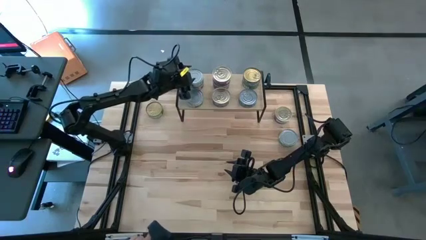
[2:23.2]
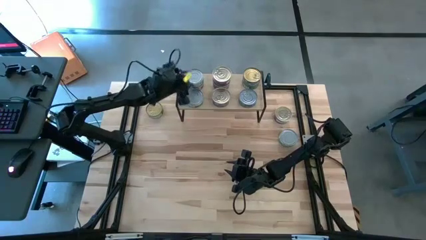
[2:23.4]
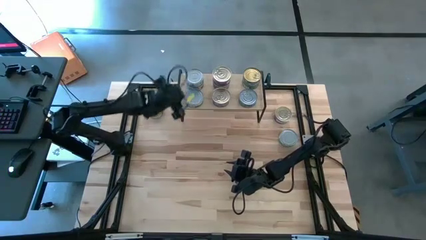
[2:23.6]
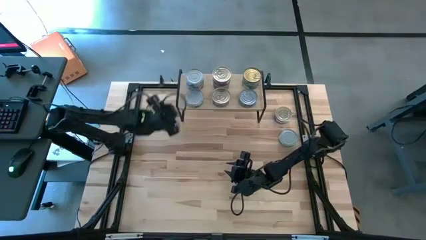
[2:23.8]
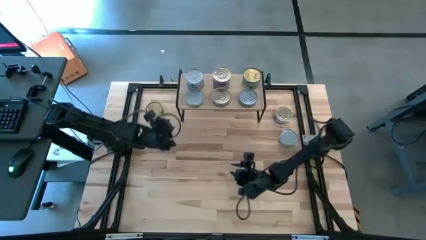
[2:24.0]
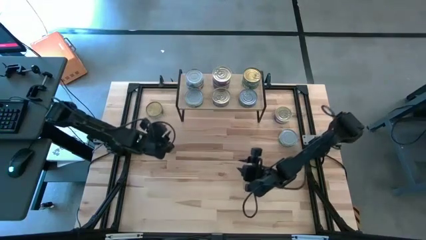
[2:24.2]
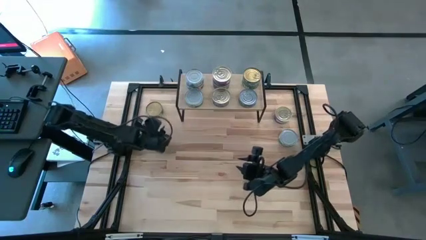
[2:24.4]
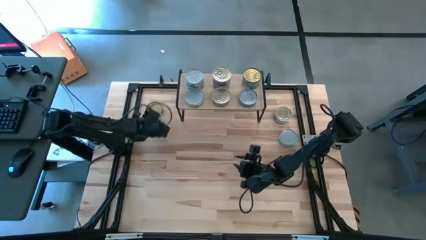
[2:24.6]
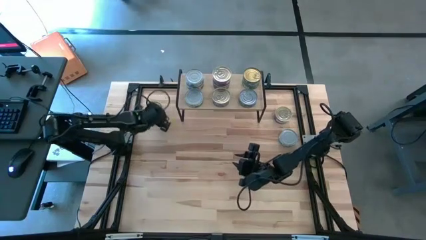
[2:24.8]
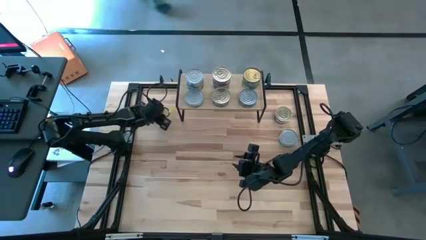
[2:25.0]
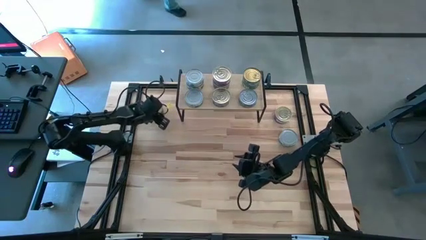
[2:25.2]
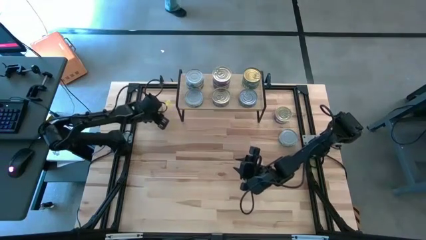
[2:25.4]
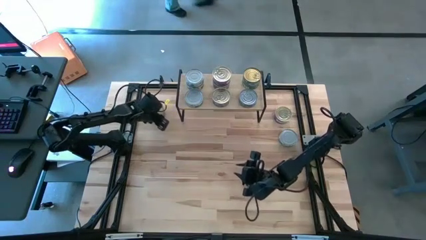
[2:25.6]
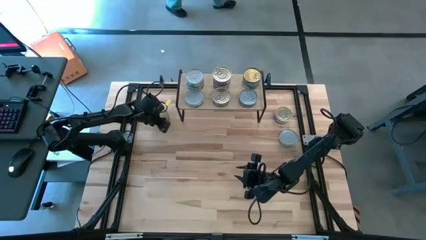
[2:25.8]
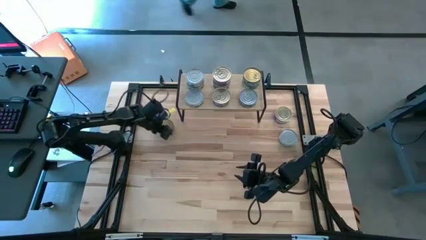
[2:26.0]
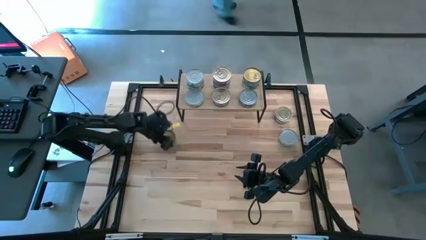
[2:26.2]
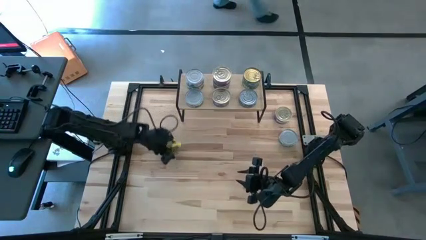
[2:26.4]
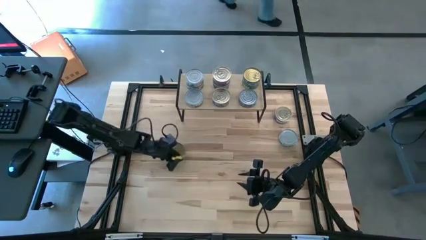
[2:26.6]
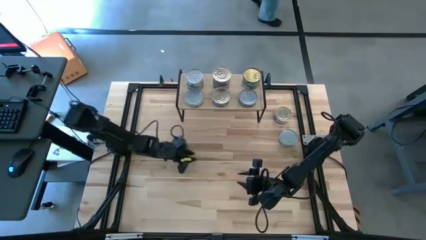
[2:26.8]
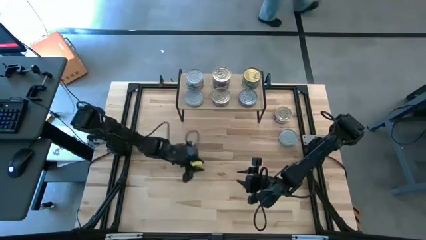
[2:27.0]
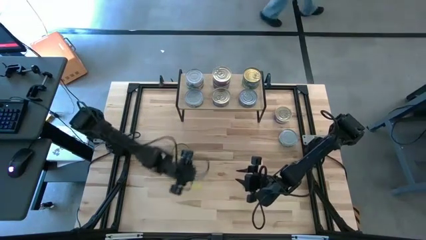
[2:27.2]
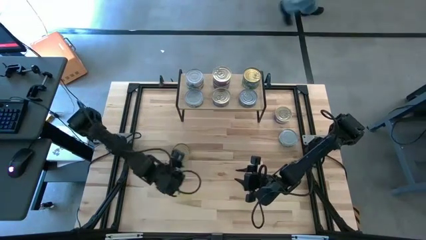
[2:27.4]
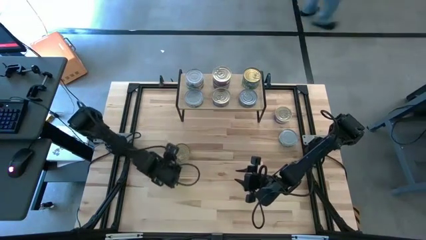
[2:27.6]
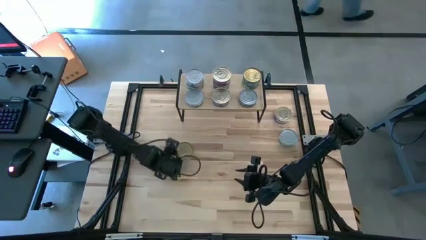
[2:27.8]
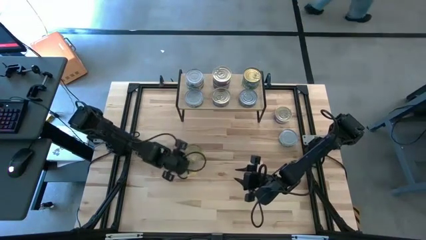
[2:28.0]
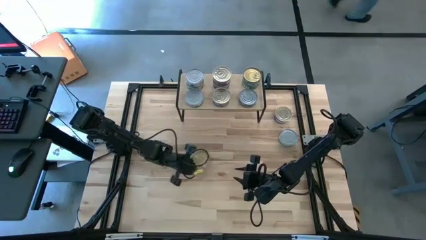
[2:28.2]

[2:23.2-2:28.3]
Task: Stack canned seafood by type on shelf
Stack the green tuna can on top of the green tuna can on the shelf

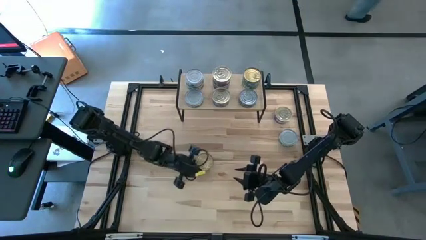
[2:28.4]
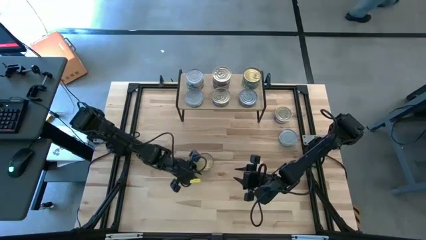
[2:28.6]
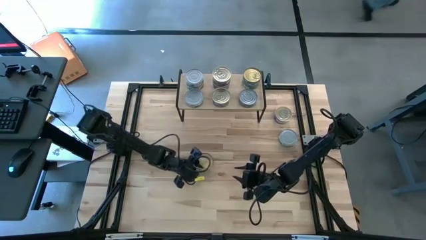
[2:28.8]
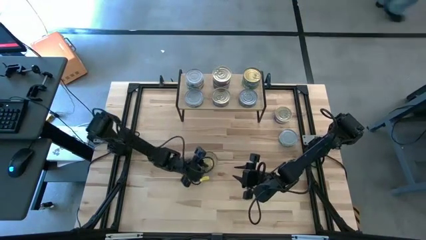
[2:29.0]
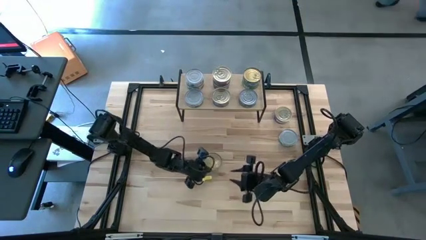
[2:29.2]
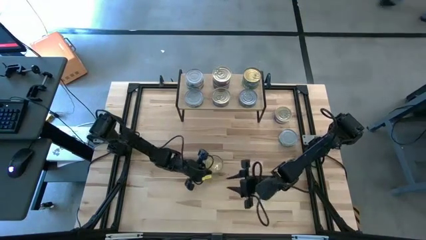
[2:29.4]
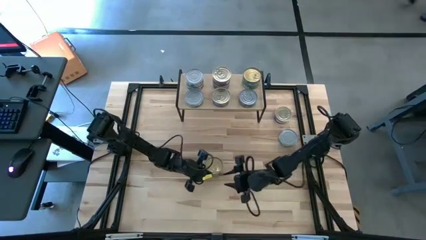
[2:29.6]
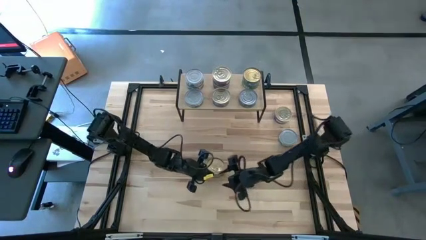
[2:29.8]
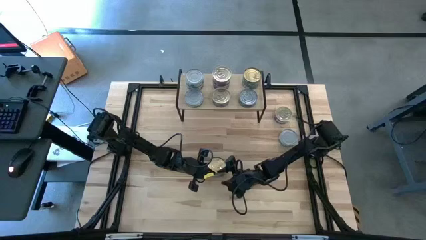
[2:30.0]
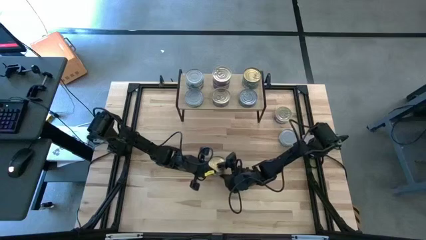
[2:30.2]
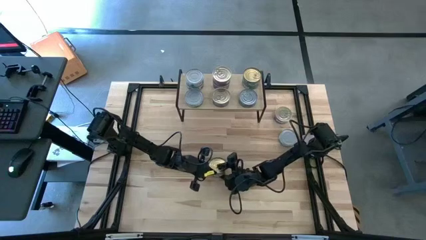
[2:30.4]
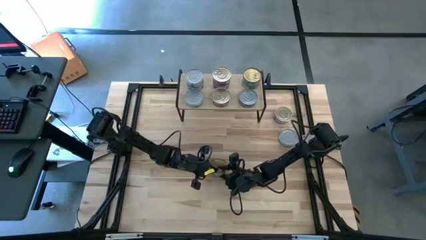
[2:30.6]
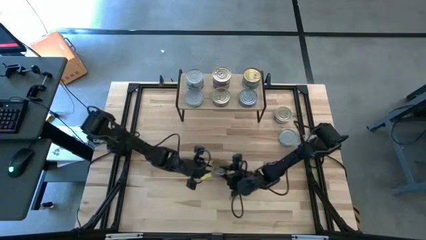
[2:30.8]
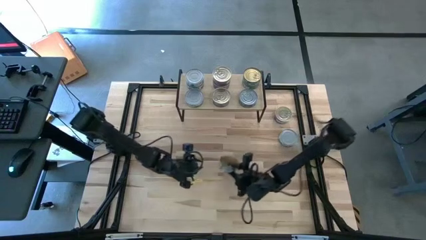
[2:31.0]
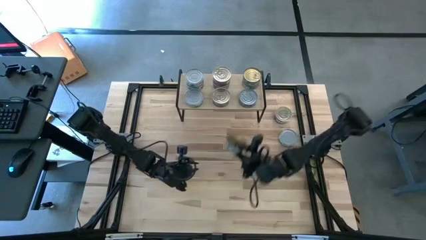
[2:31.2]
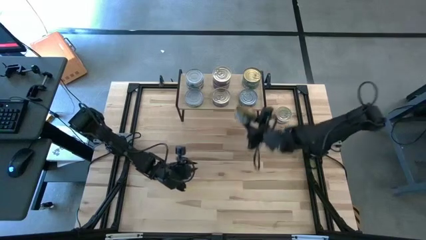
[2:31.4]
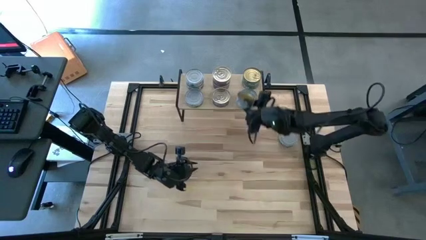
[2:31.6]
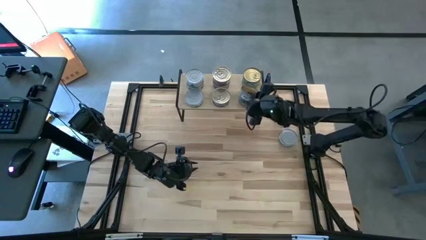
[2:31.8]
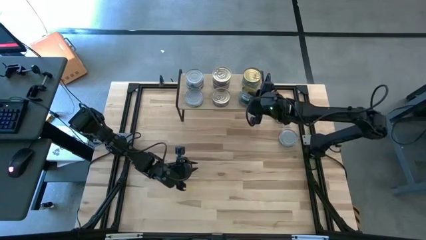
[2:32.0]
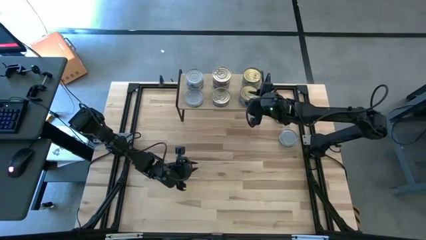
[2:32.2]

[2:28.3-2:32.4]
Stack the green tuna can on top of the green tuna can on the shelf

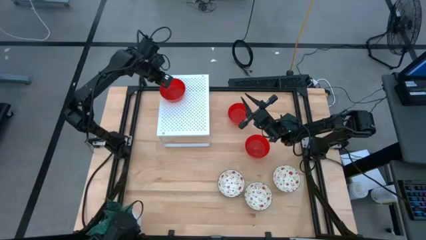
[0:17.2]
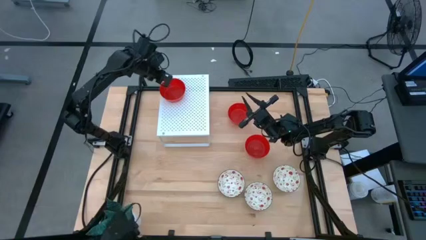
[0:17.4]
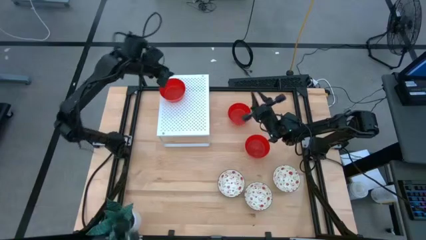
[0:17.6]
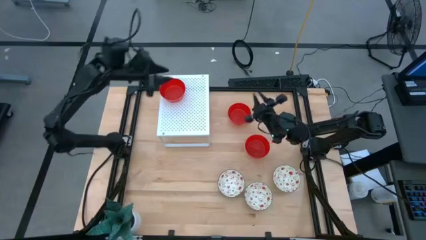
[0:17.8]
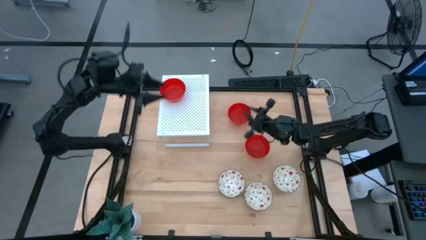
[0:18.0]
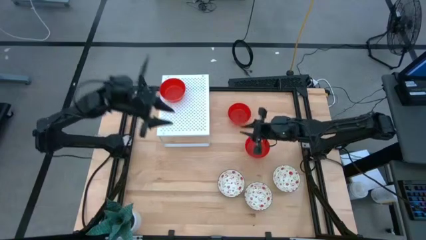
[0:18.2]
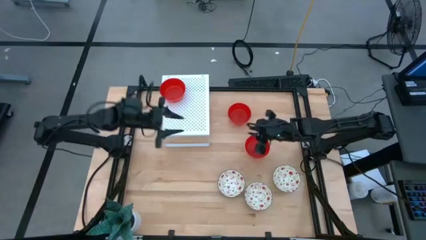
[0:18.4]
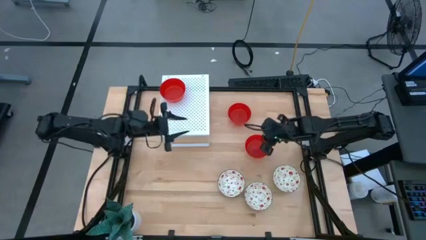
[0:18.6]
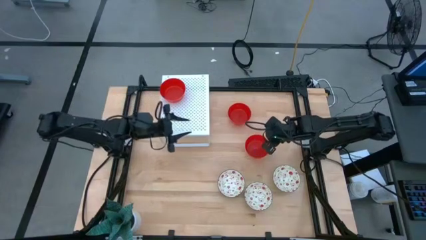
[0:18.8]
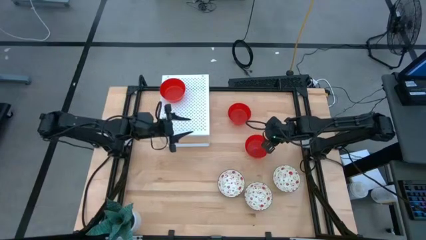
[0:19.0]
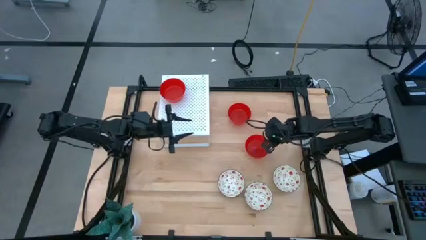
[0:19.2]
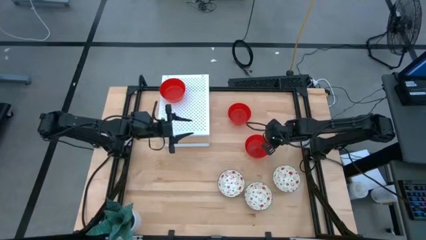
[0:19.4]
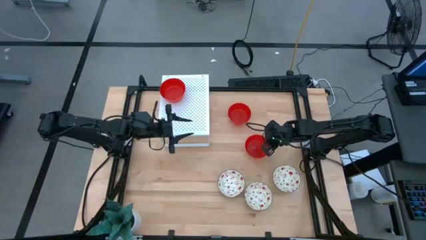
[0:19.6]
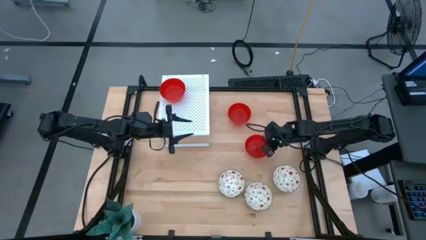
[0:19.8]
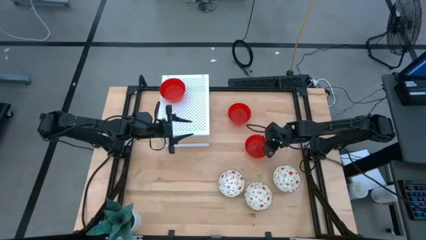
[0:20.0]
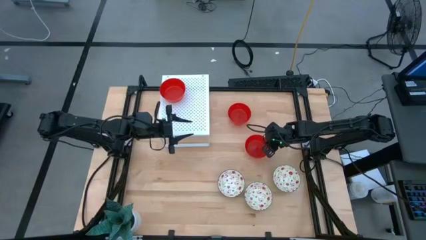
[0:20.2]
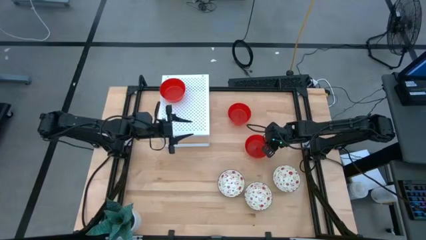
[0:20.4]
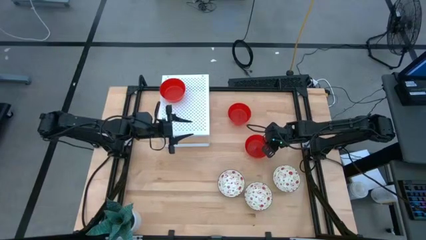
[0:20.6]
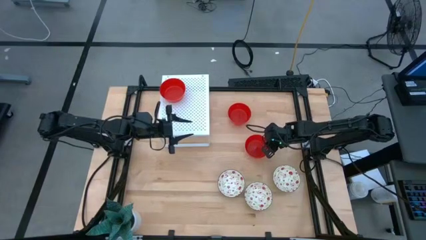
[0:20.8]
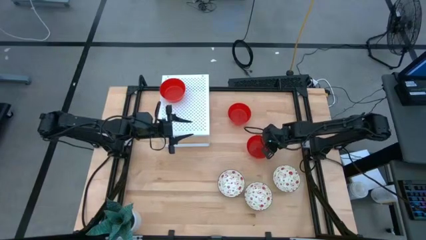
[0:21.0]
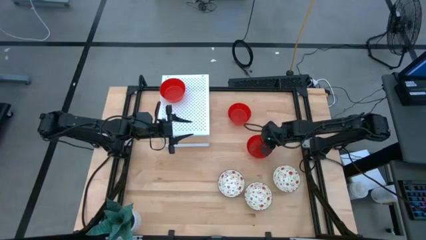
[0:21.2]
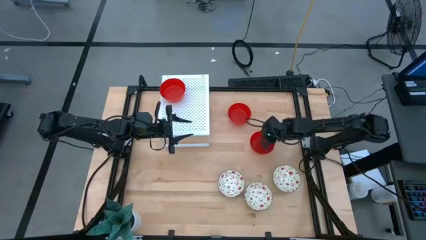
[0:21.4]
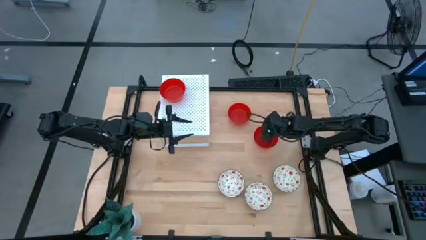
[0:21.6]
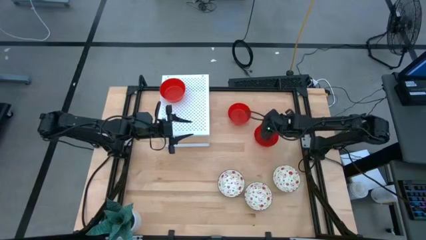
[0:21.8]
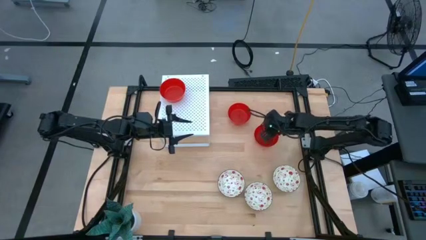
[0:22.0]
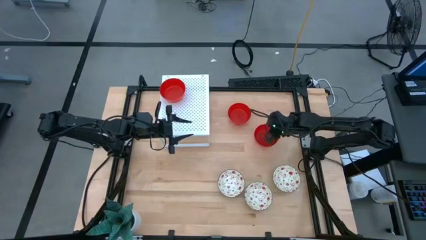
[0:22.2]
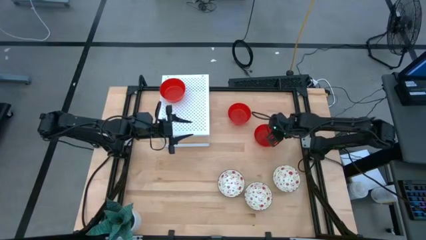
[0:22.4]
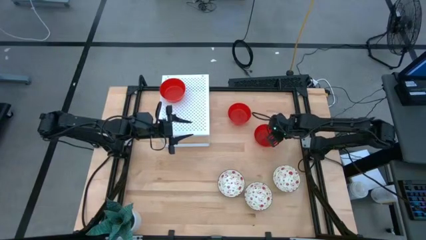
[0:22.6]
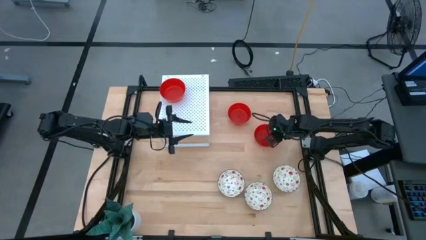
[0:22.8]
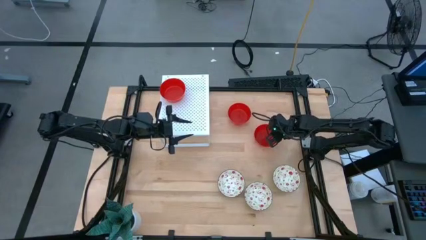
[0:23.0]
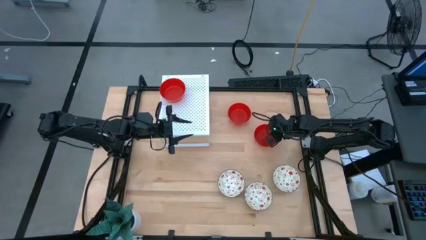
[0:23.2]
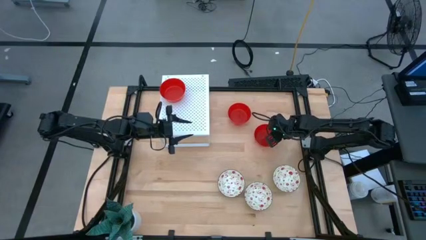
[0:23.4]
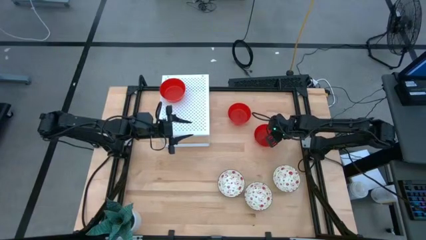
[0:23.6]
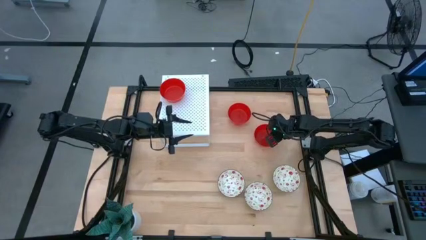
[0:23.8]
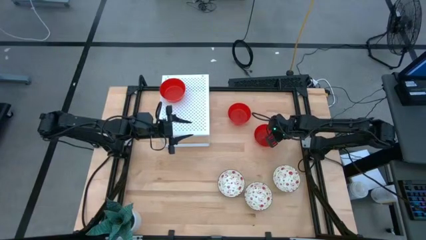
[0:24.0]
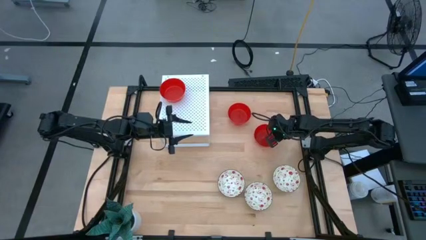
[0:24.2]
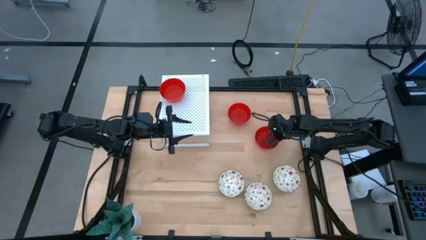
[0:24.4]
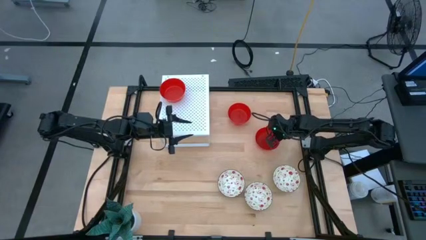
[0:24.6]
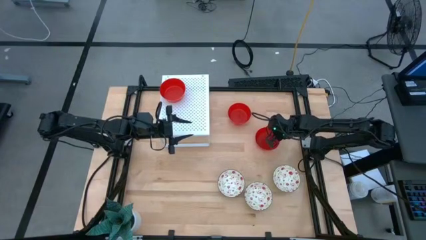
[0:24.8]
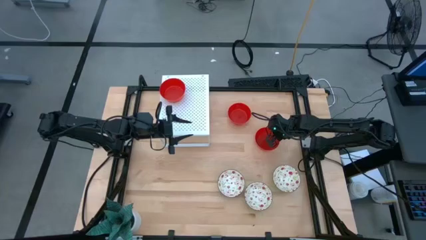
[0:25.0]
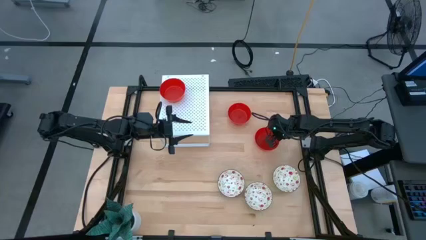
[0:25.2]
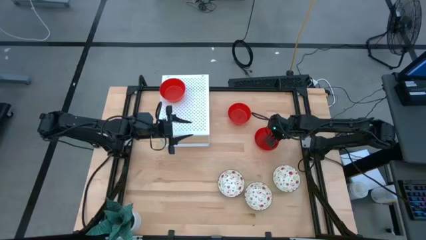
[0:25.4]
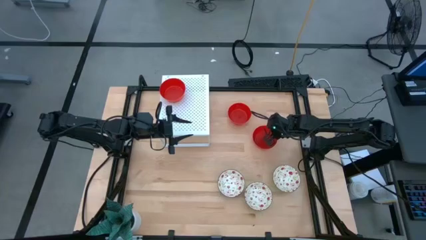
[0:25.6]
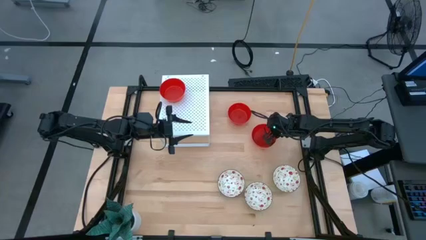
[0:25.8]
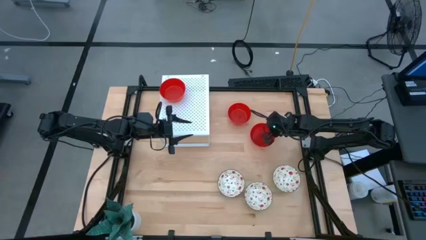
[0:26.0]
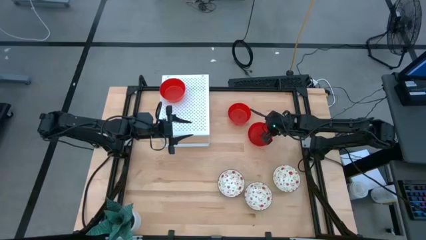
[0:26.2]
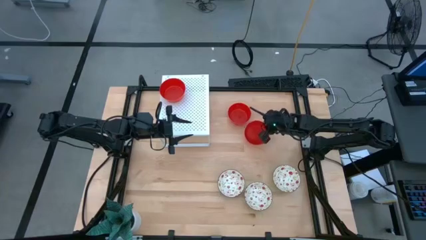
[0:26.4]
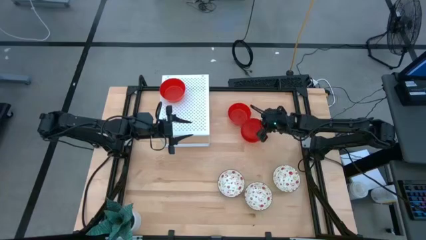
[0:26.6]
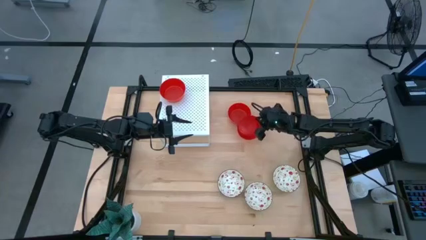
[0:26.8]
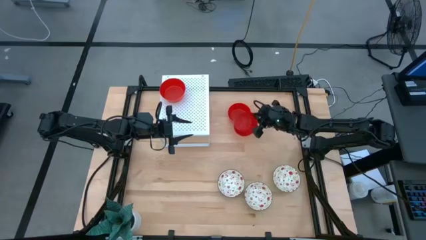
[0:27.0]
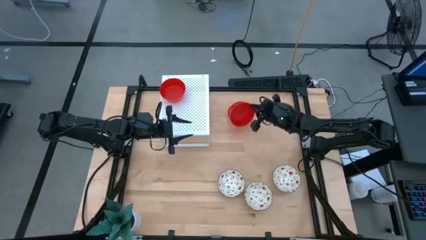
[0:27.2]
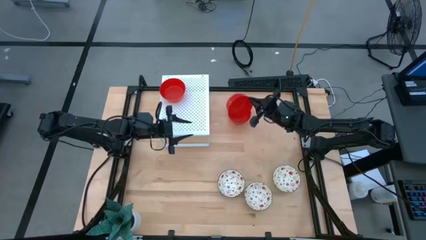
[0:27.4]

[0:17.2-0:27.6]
Task: Pick & Place Mini bowls
Stack the bottom red bowl on top of the red bowl on the shelf
